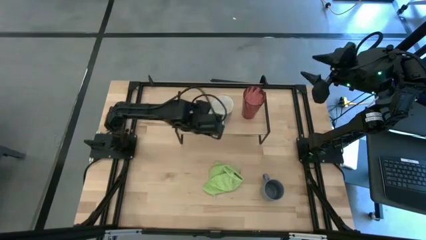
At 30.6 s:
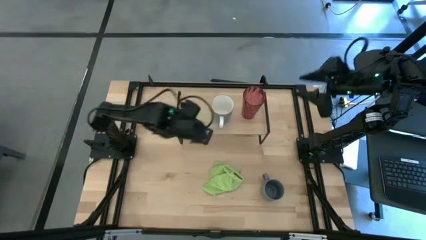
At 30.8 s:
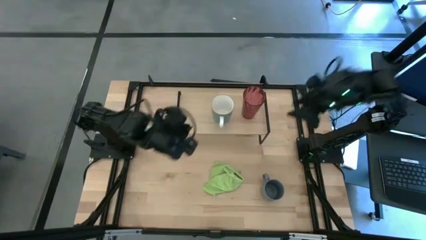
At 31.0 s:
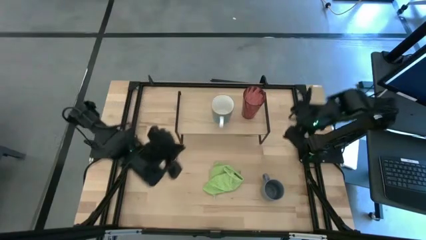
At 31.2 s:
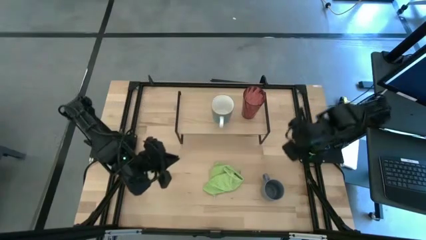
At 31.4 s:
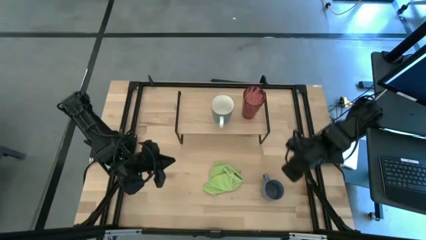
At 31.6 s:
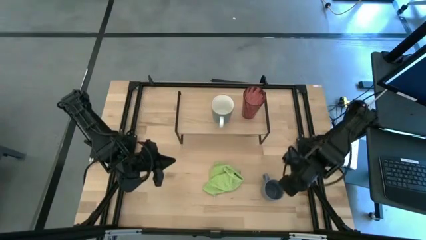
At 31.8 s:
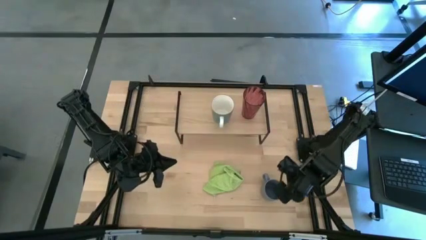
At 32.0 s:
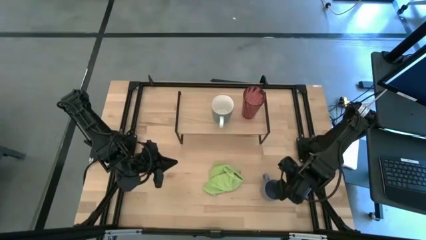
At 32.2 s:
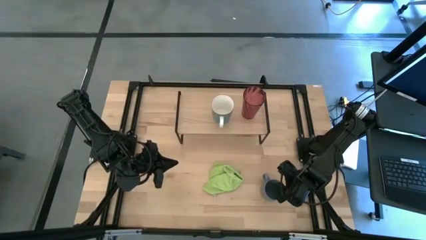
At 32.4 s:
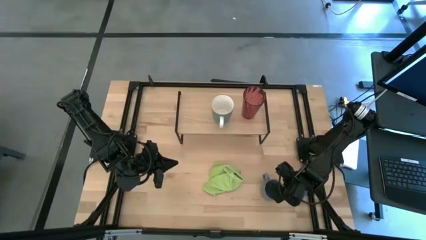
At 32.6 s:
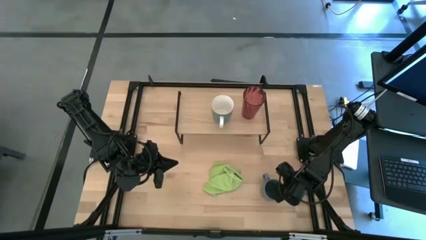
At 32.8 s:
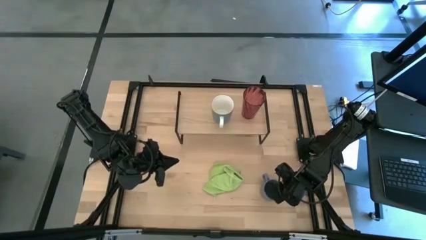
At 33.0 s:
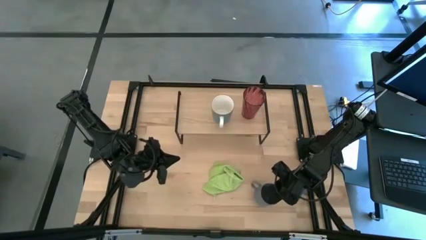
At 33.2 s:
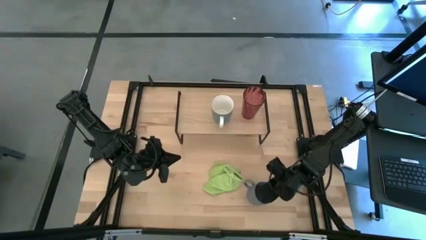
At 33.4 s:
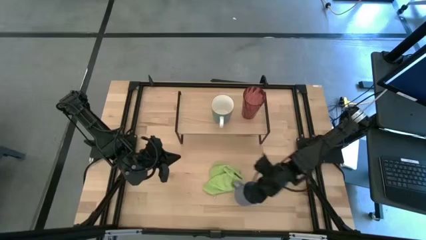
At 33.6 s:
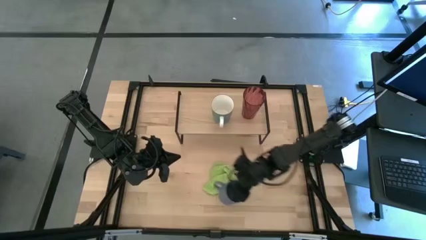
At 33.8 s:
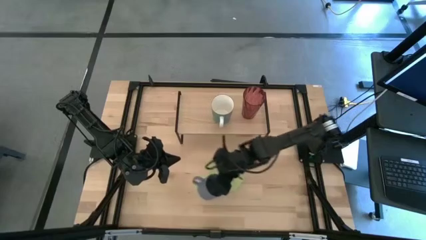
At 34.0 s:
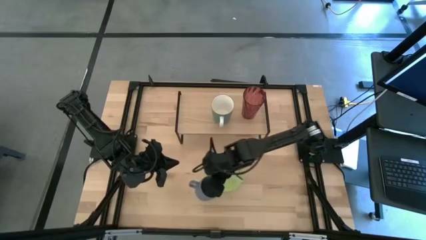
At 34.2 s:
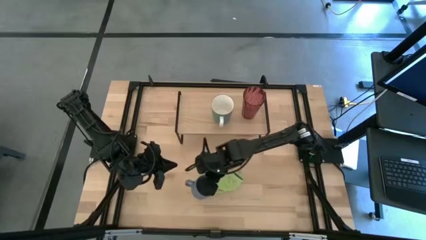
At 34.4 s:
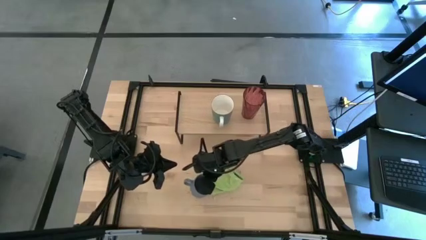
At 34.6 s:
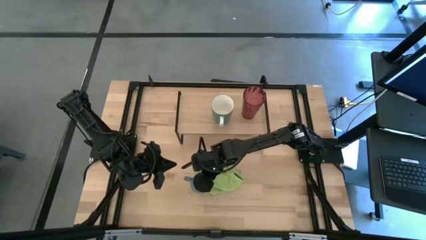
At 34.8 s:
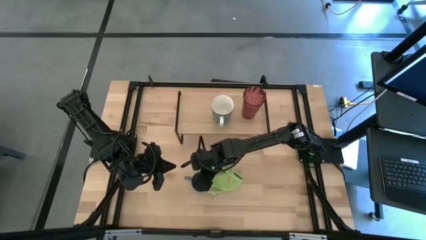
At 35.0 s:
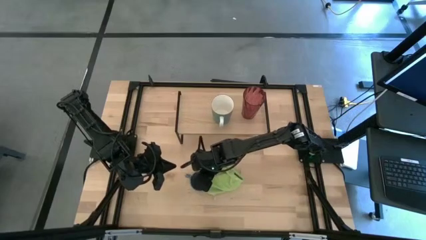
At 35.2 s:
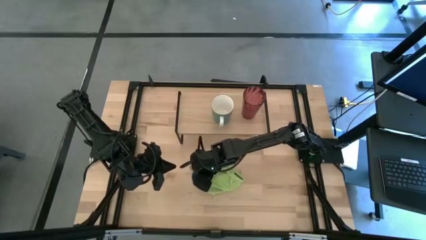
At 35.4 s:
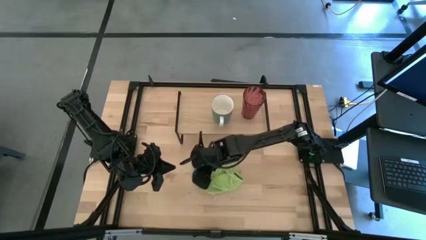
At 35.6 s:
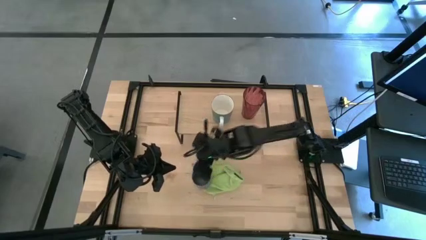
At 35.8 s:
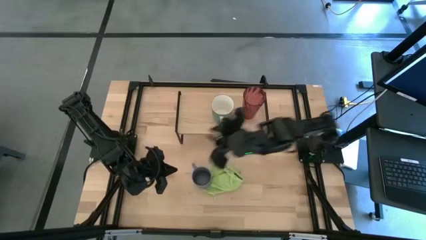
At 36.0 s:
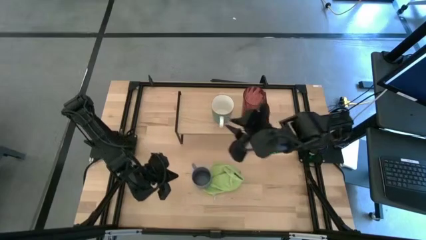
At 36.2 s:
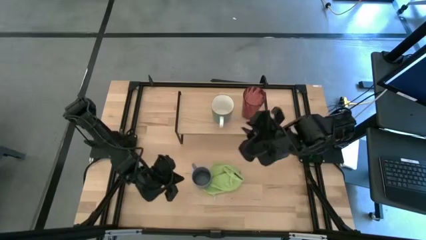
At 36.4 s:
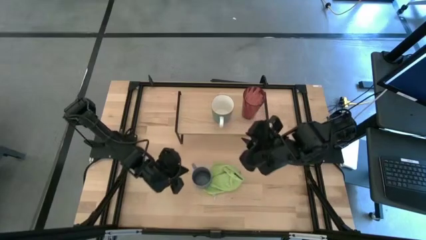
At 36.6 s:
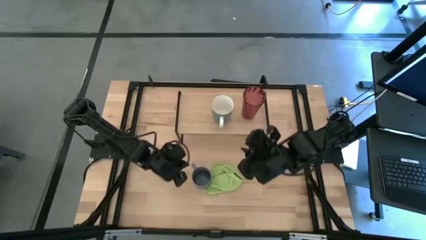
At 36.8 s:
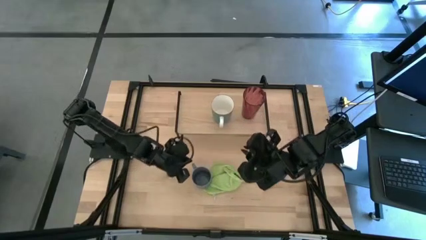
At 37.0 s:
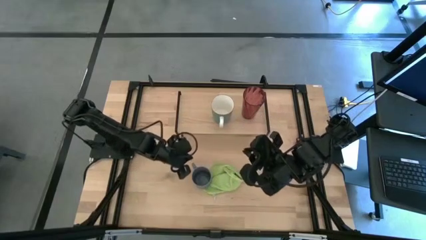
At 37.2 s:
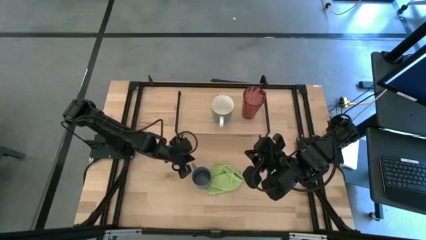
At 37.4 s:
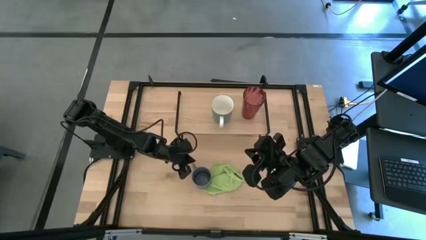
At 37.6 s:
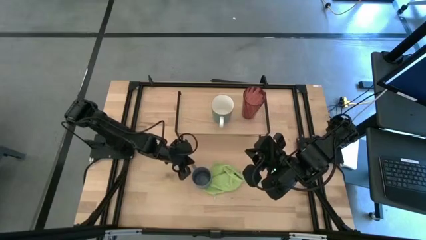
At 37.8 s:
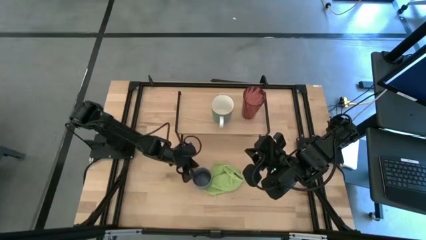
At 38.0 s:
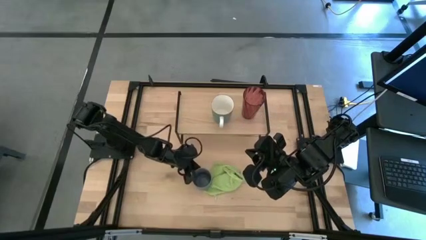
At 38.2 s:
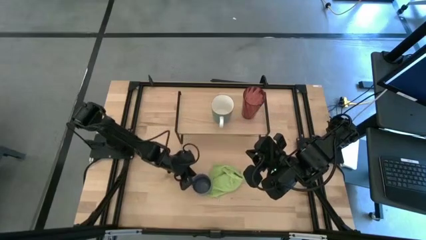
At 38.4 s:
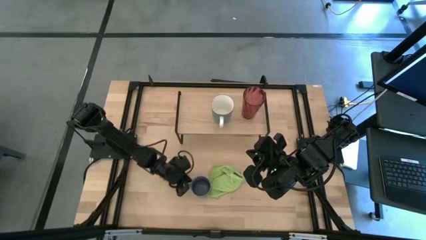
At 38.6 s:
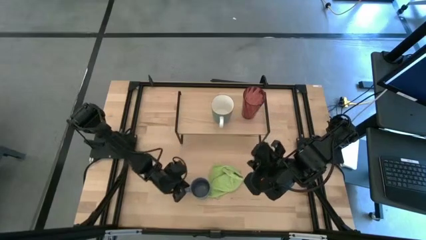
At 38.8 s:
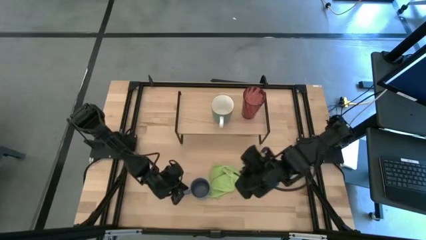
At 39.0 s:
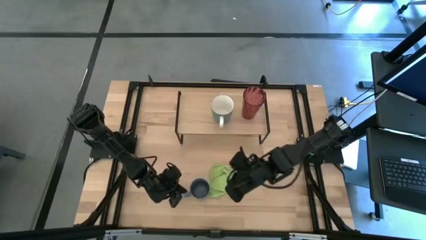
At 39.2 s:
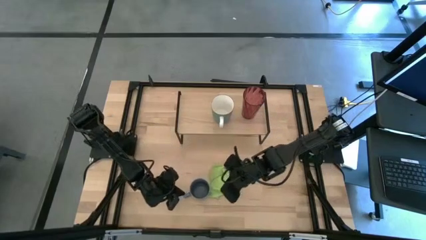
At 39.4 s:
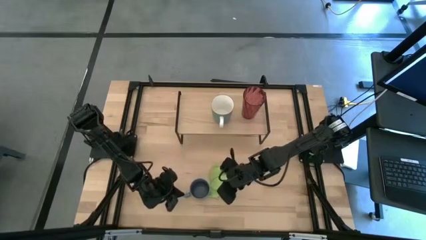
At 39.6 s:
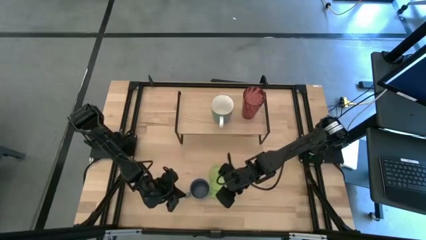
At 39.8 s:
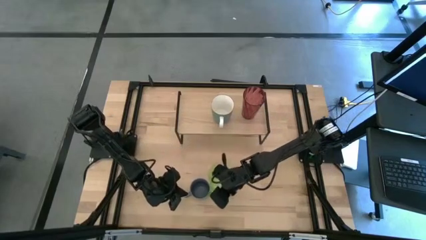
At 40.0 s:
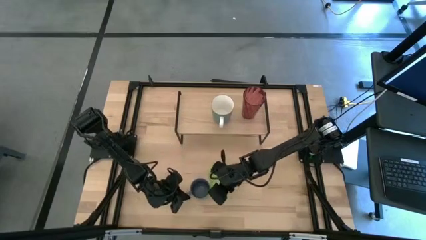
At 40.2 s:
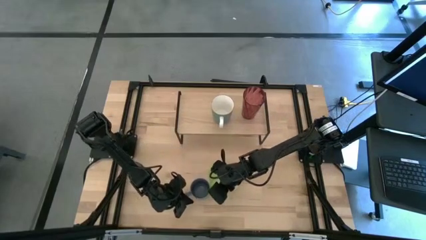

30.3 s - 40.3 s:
Task: Stack small to large cups/mugs on shelf
Put the gray mug on the shelf
